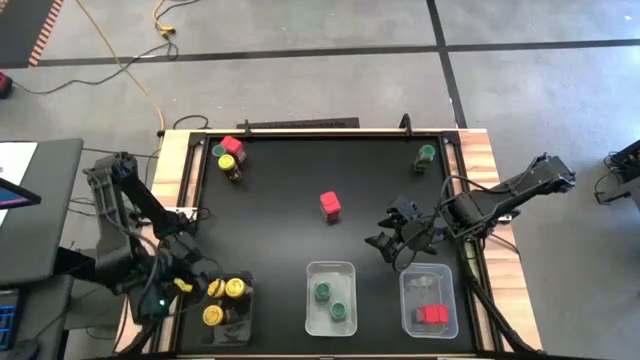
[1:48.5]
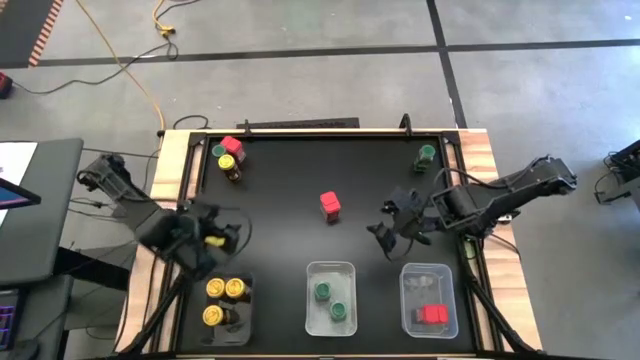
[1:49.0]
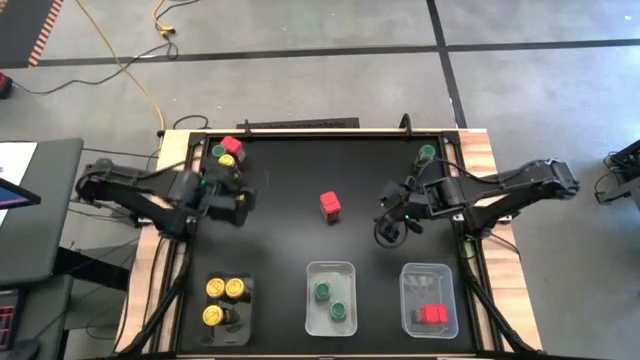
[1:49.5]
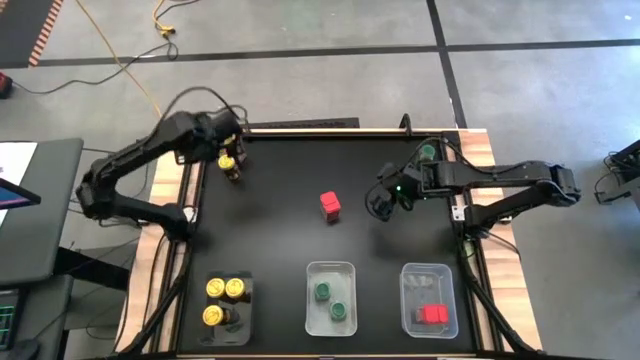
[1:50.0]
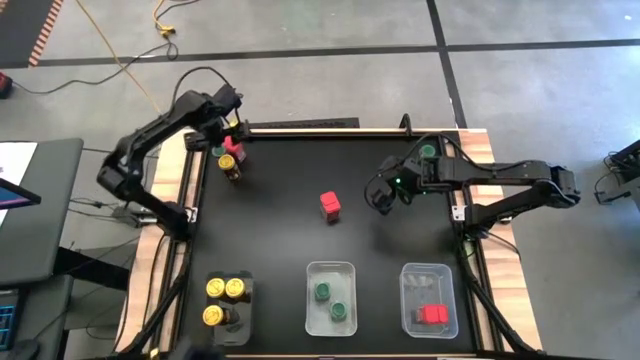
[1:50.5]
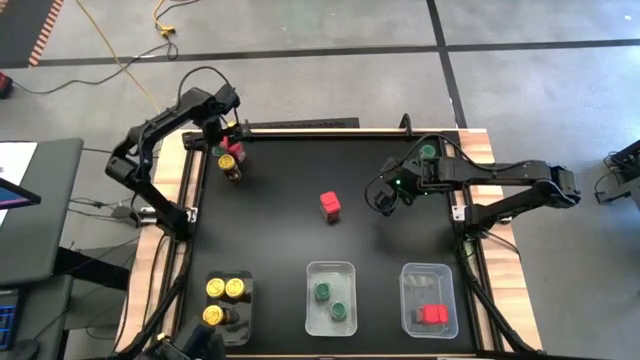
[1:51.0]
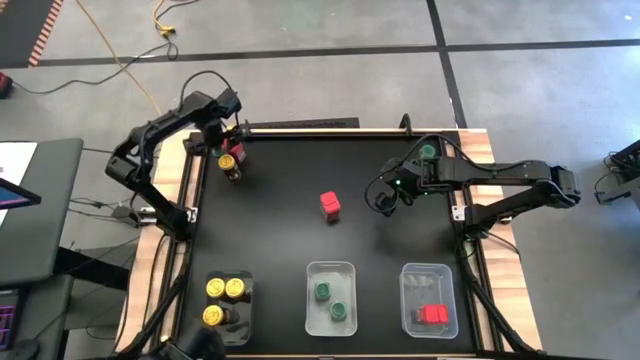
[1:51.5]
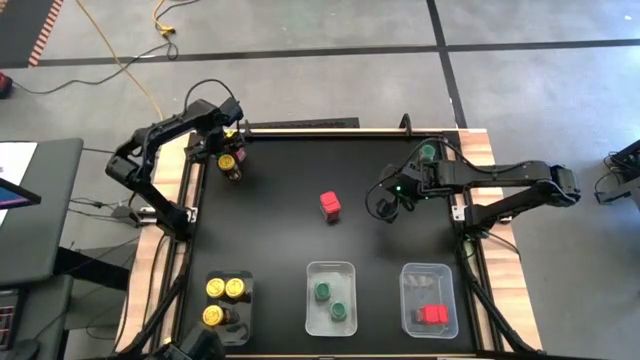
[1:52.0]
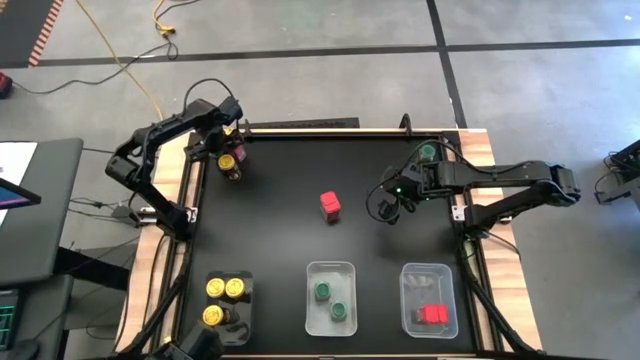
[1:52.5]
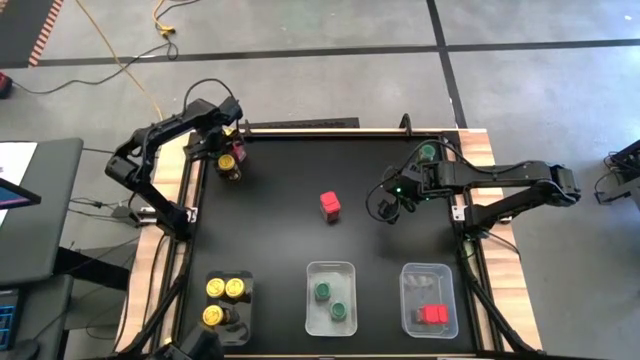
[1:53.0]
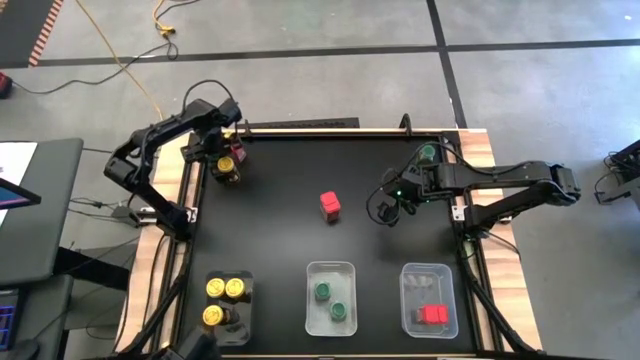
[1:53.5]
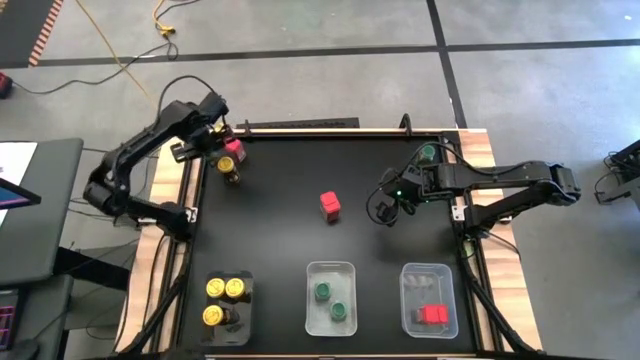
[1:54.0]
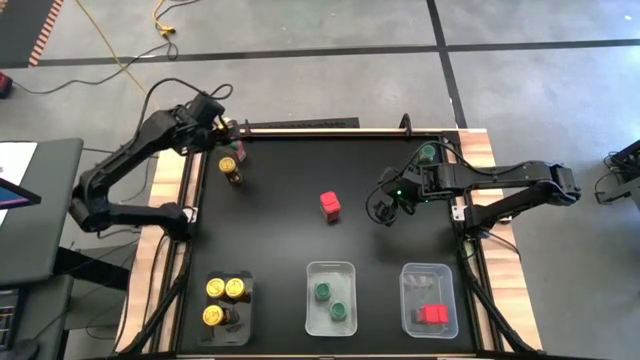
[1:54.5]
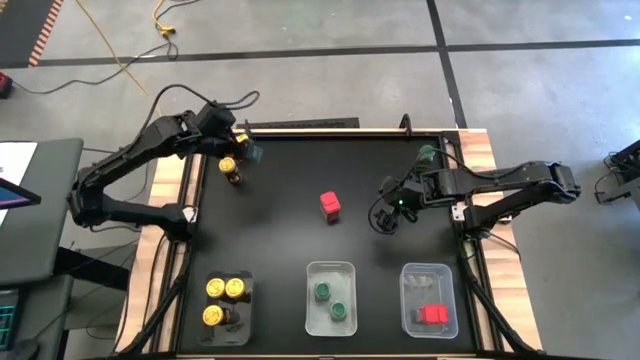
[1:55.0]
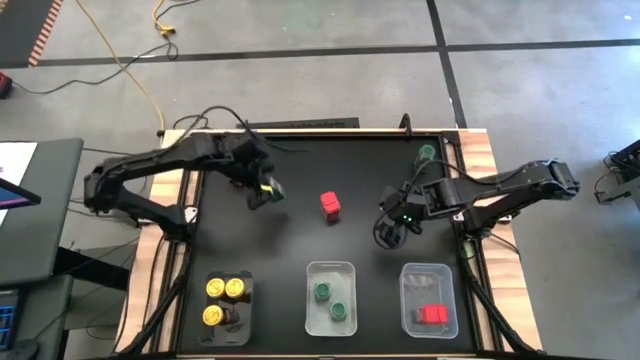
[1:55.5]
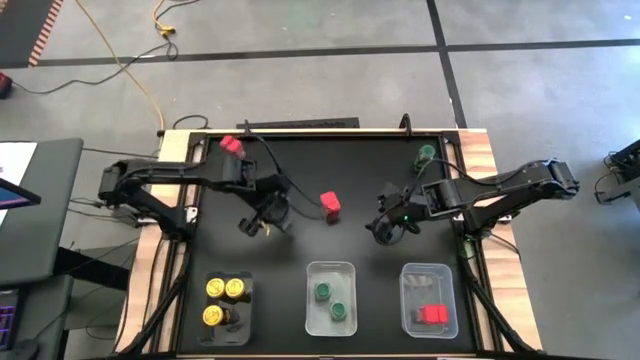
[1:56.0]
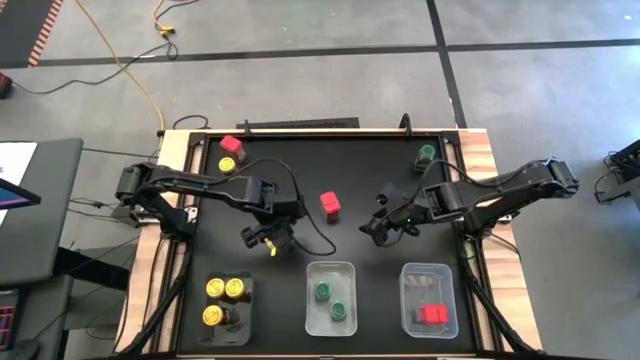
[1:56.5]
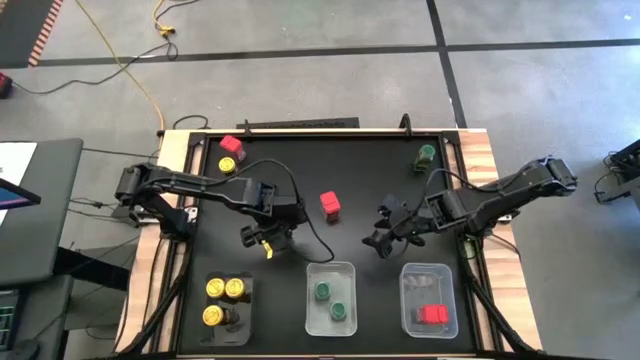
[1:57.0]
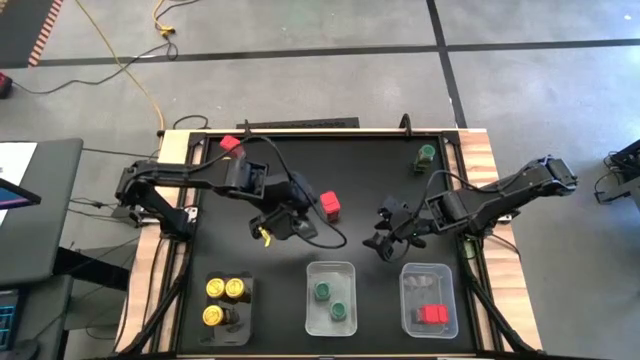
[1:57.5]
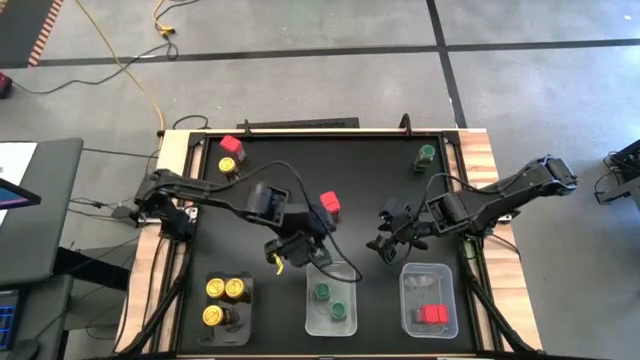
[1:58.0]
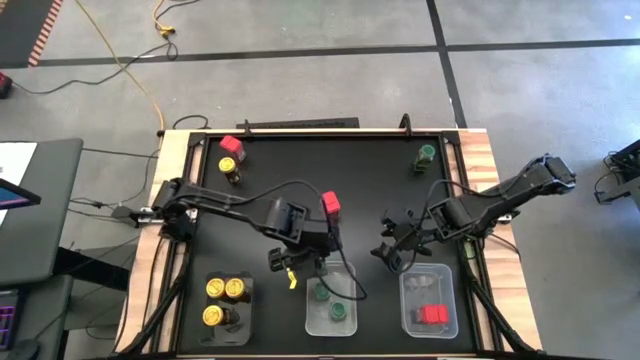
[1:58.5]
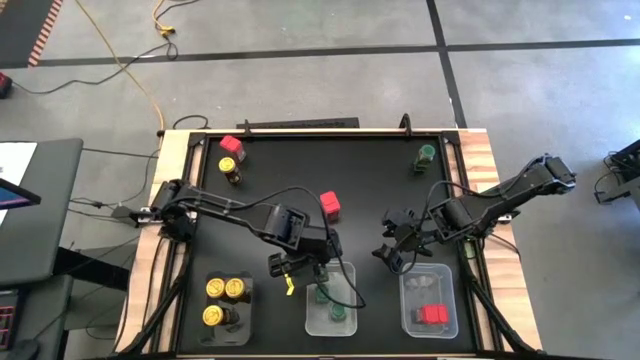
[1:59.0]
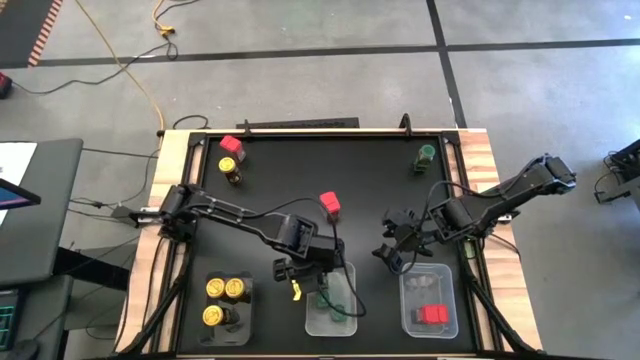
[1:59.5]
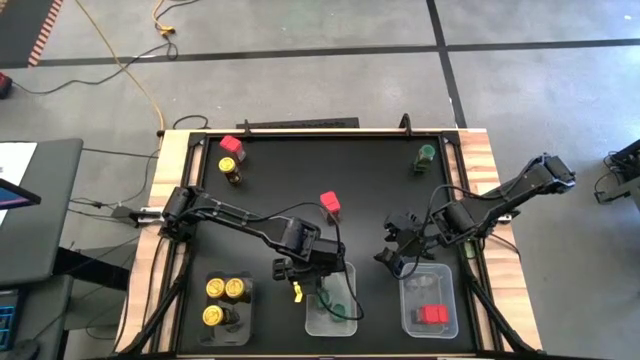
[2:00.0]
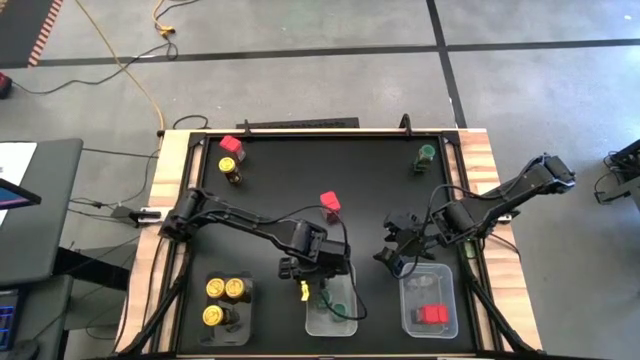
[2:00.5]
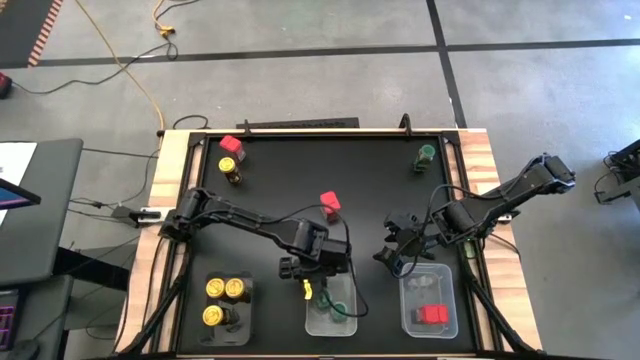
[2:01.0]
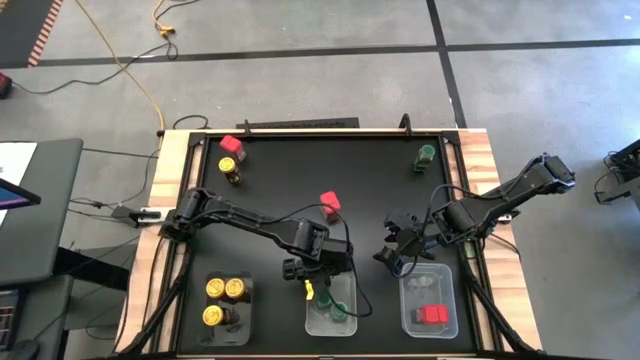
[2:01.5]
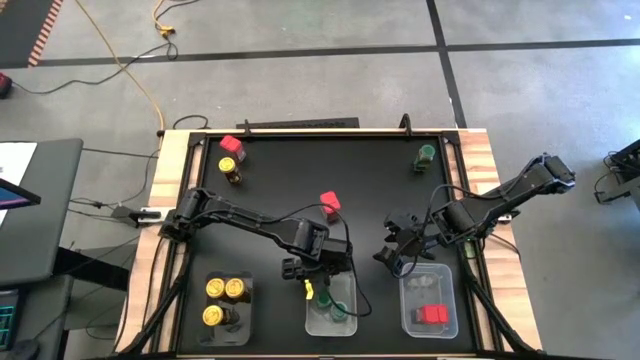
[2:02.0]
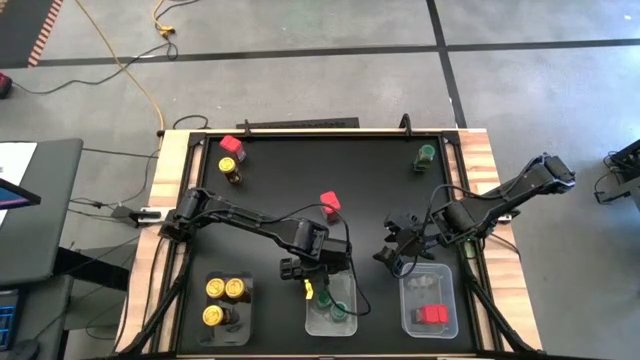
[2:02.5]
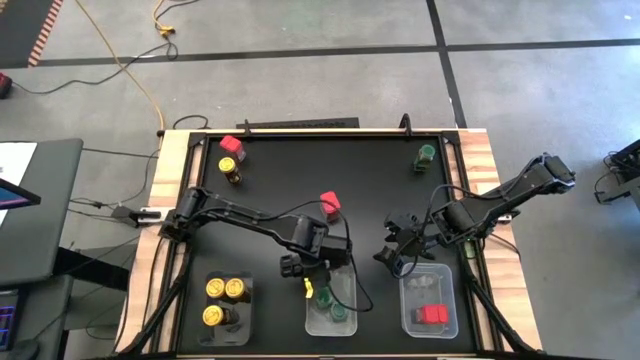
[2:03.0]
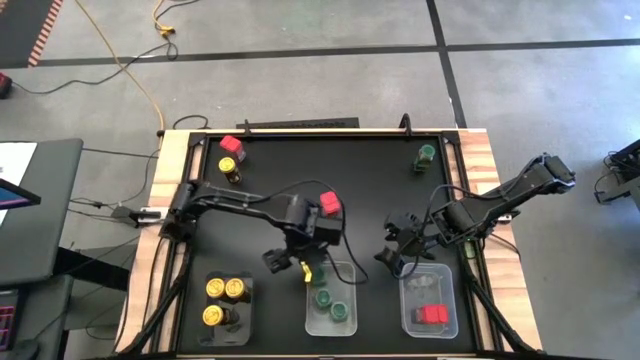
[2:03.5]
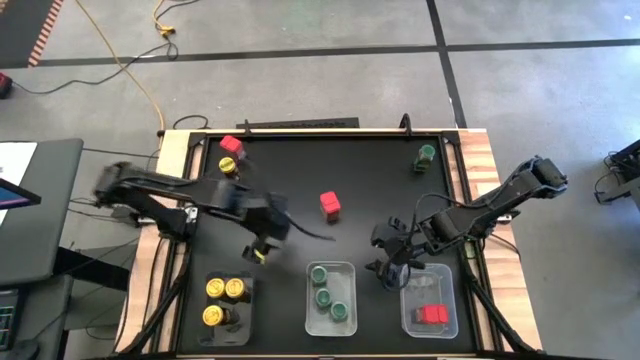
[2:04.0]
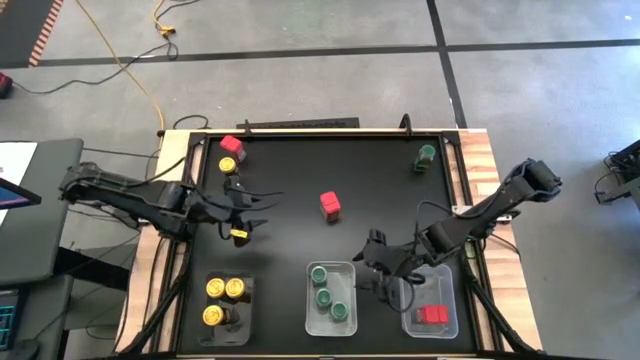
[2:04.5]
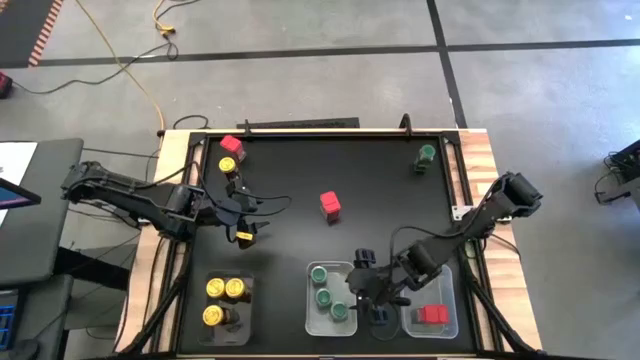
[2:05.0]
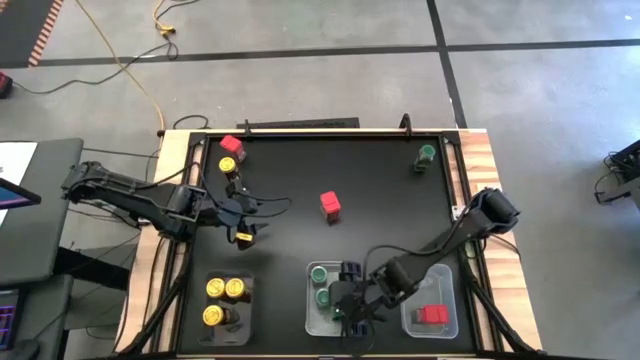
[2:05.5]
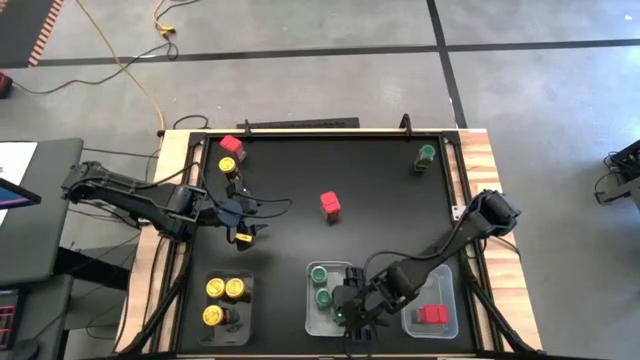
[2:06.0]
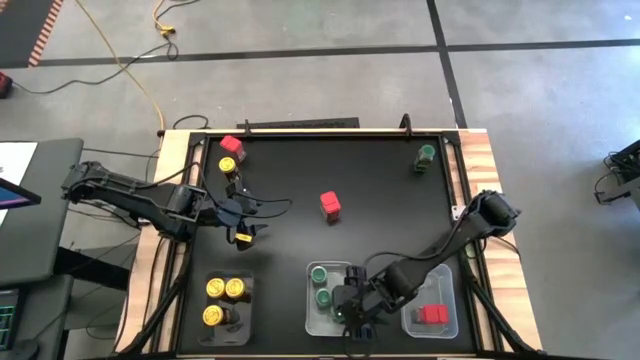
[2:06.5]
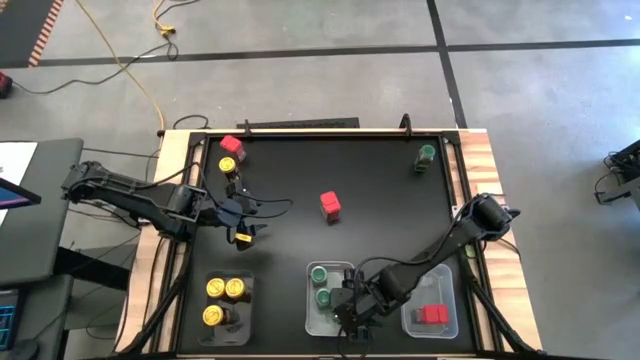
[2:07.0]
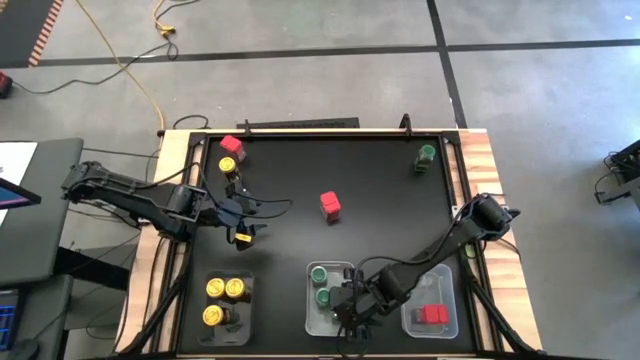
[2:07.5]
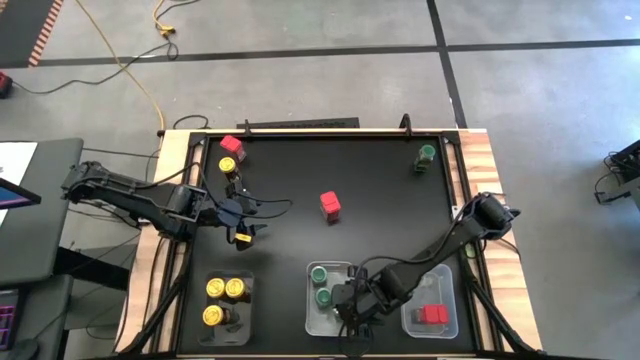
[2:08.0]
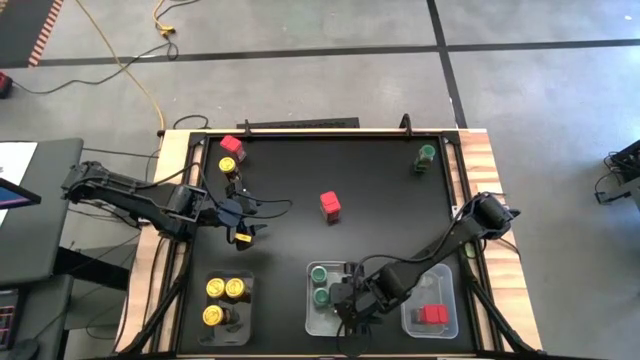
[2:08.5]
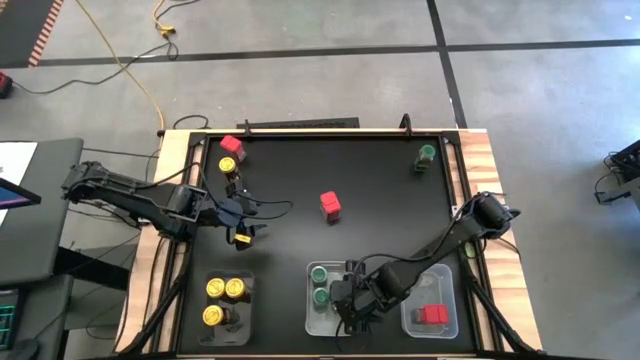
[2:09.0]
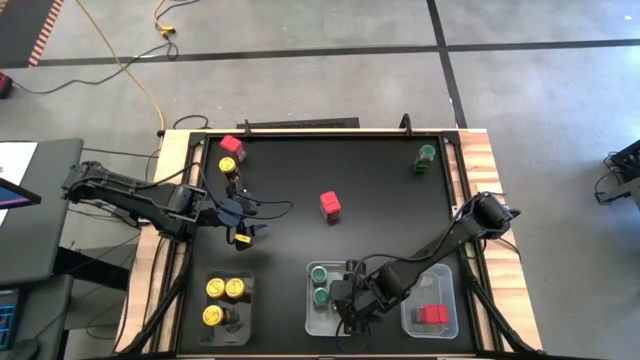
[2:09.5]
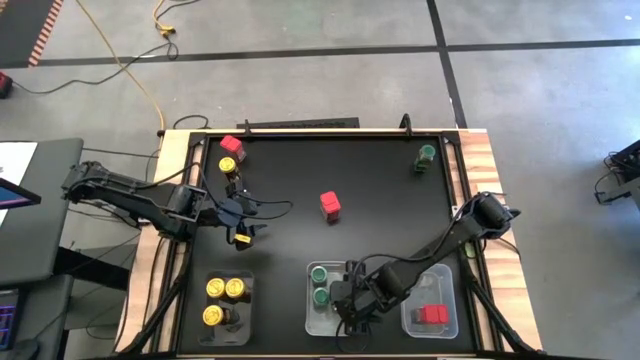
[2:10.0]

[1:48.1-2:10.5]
Task: Sort spices by type
Put the left green seasoning bottle into the white bin
